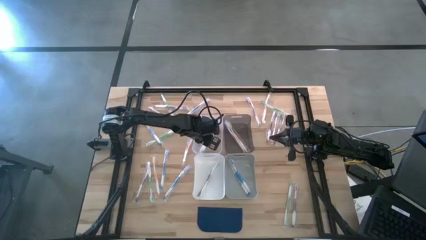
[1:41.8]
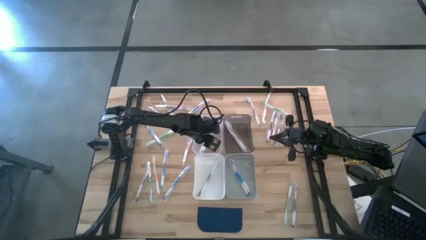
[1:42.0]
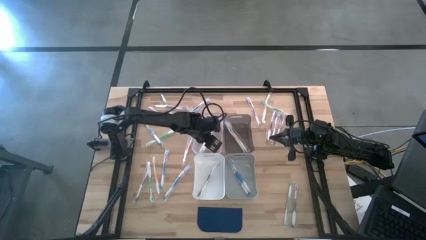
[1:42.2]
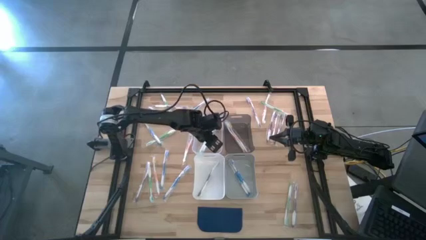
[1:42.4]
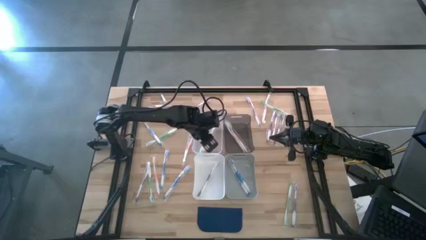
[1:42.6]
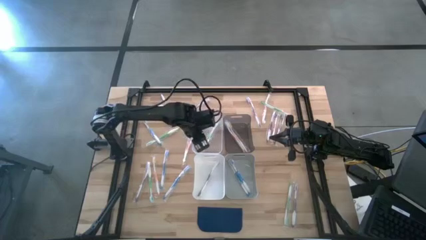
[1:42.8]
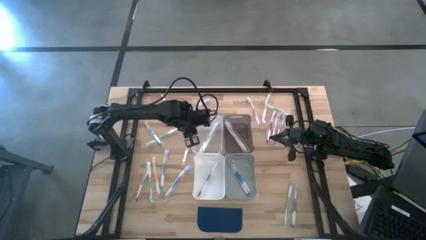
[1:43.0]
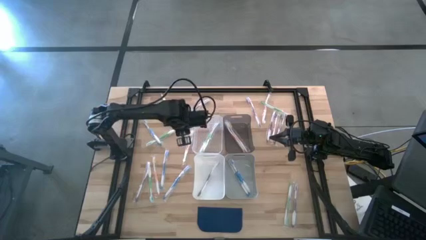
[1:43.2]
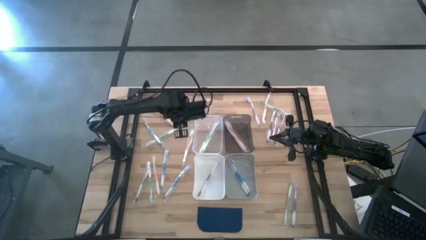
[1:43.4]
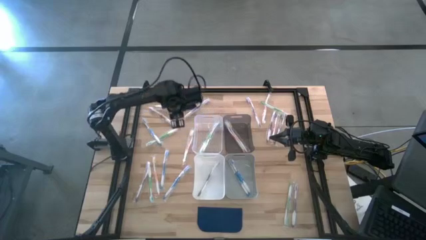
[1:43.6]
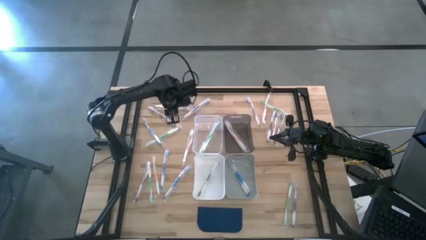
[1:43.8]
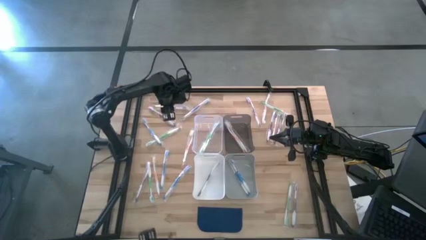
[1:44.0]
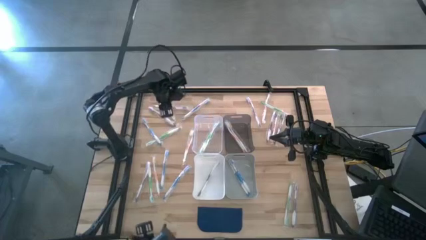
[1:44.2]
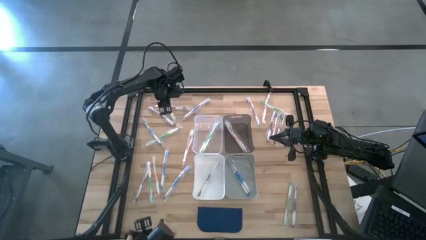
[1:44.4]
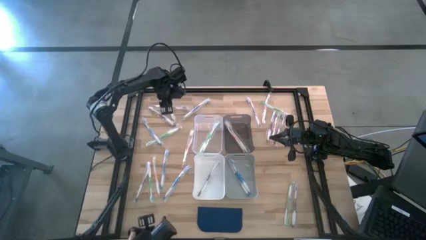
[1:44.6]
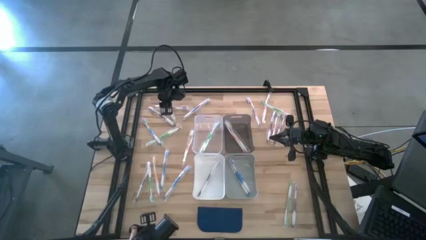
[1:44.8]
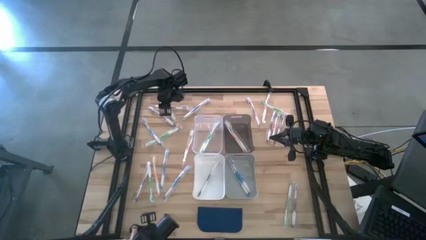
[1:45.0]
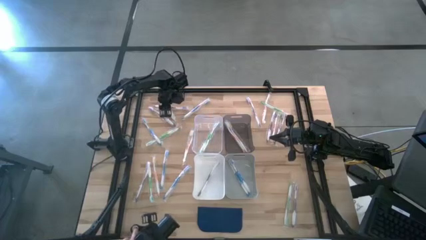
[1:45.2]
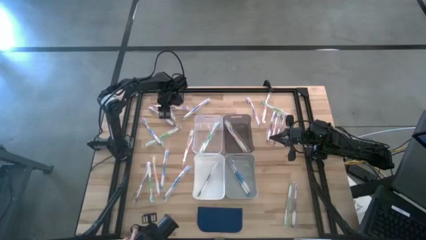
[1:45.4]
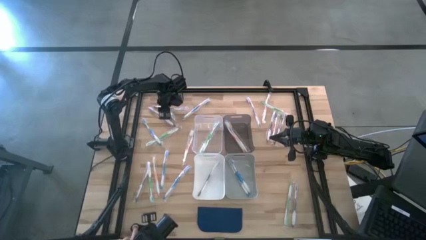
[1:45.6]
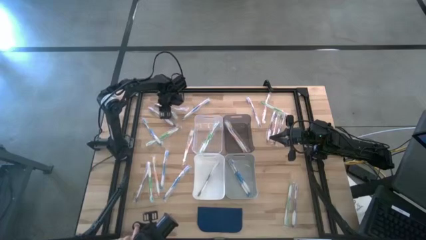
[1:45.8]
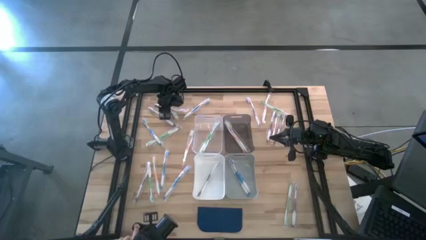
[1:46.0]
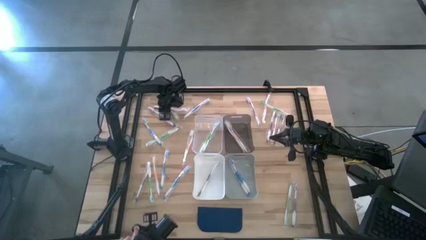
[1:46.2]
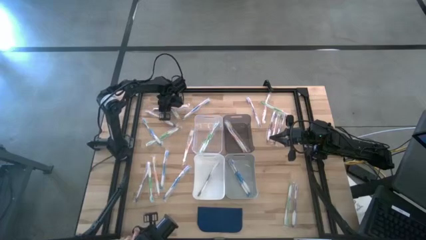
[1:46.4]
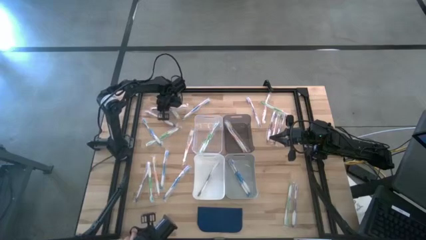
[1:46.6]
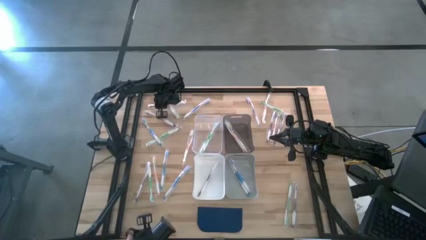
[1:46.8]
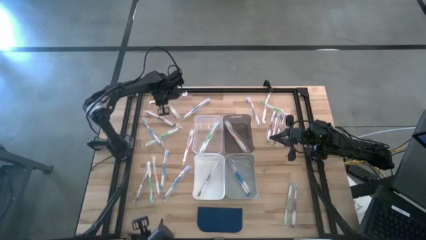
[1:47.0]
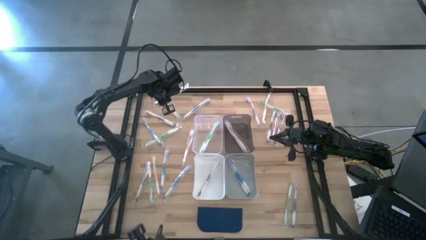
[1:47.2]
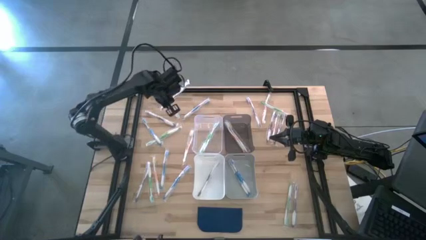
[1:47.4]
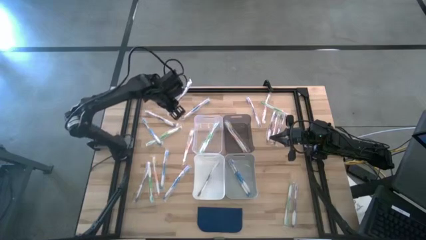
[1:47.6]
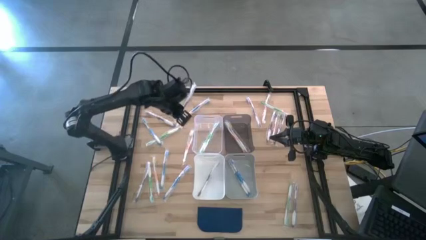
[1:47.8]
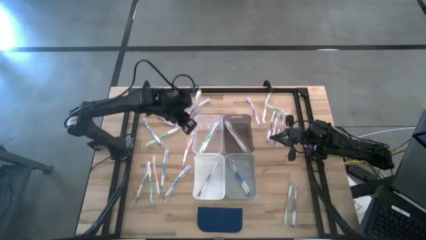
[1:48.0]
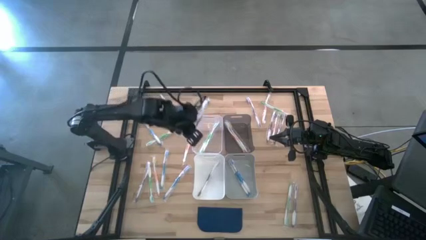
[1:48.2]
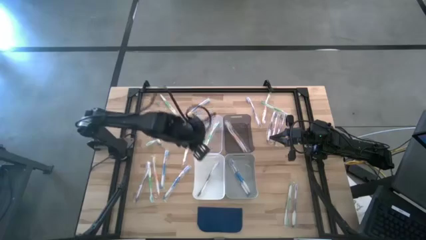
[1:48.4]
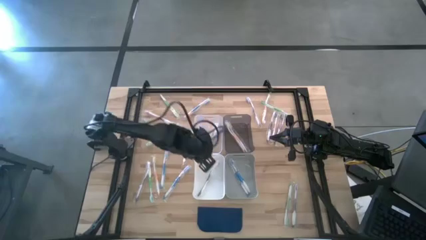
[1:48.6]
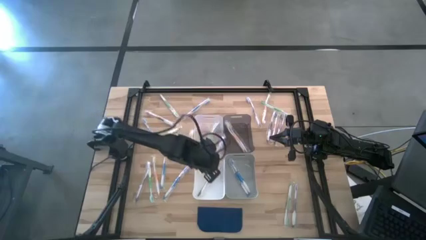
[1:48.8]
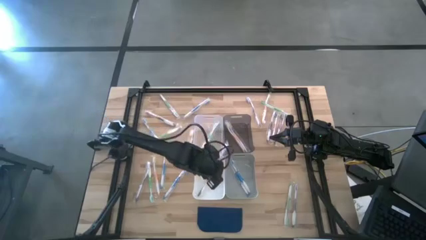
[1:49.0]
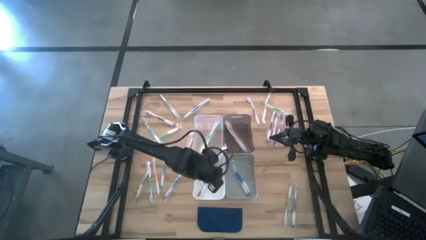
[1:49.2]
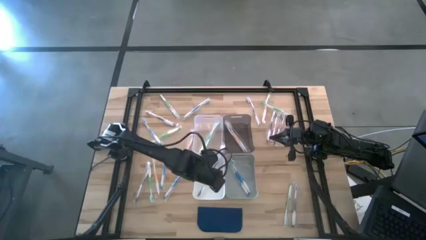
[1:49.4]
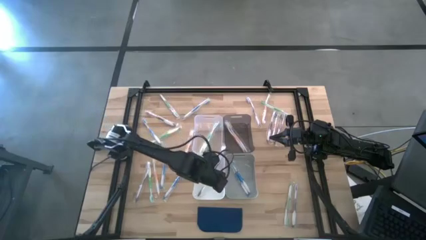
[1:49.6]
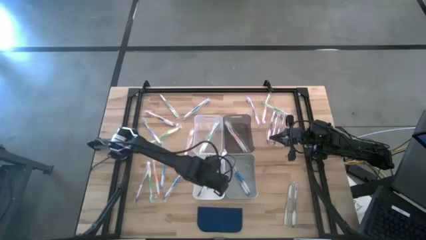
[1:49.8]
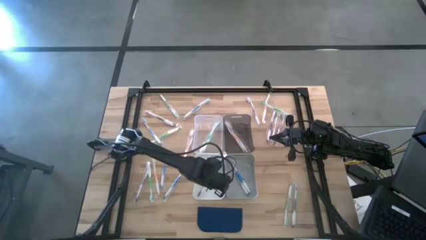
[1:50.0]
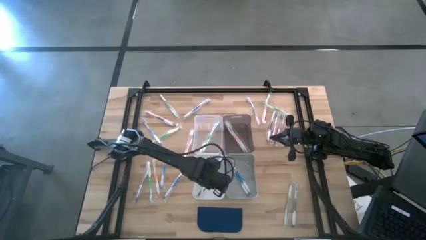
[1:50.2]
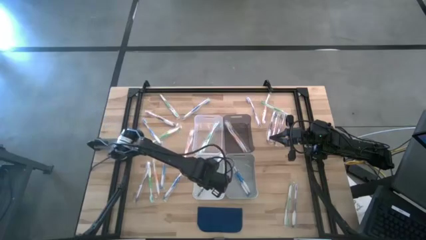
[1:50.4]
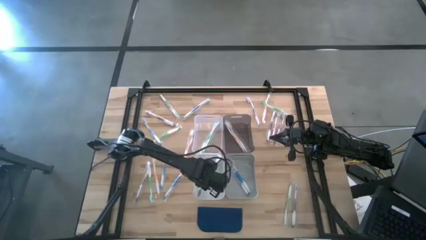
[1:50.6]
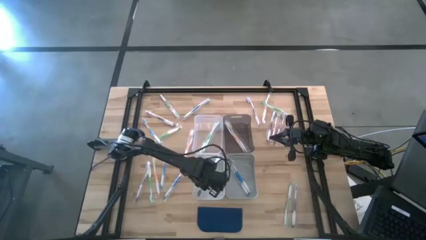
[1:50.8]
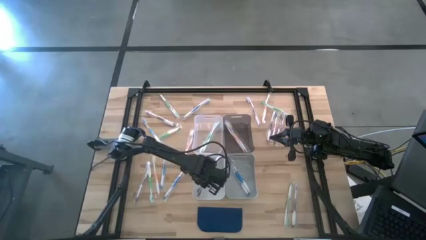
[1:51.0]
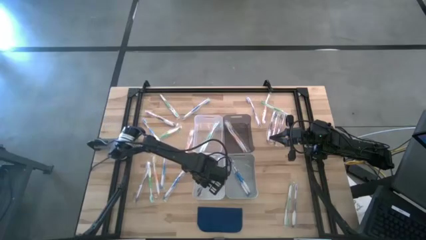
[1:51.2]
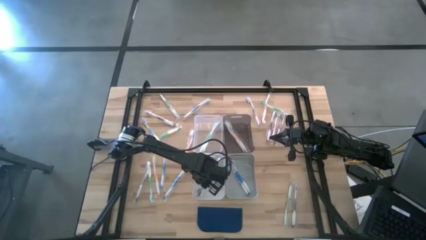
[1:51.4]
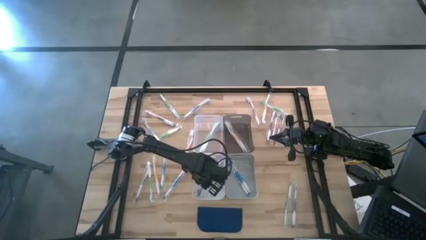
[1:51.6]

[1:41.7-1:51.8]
Task: Pick & Place Toothbrushes
Put the violet toothbrush into the white bin

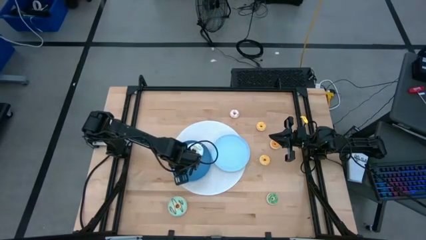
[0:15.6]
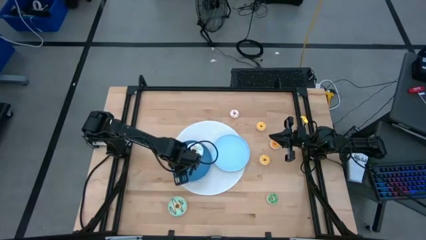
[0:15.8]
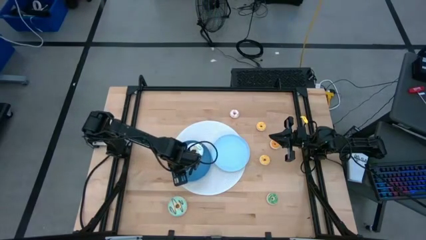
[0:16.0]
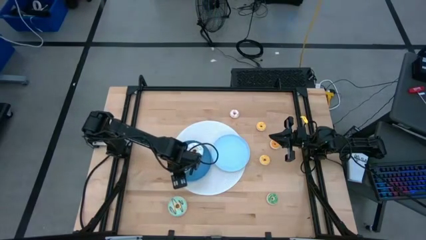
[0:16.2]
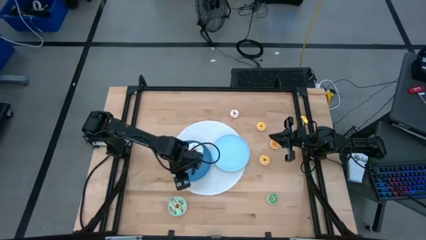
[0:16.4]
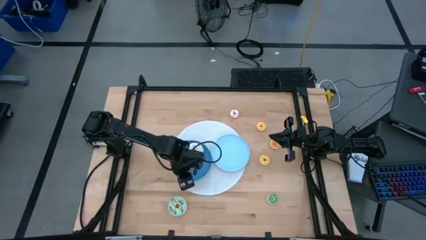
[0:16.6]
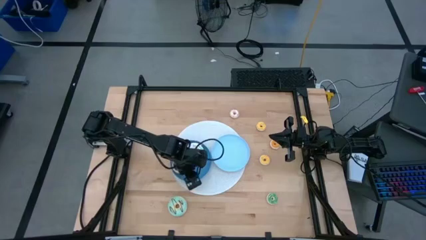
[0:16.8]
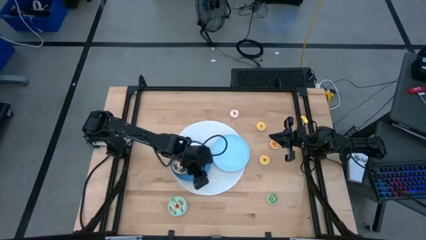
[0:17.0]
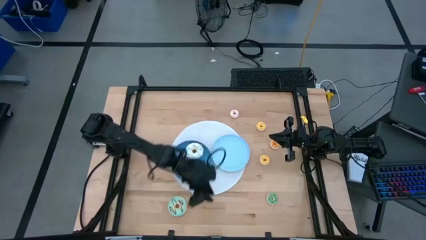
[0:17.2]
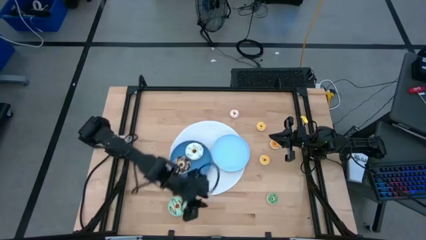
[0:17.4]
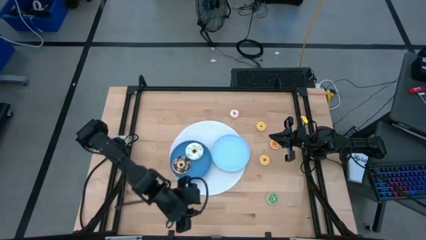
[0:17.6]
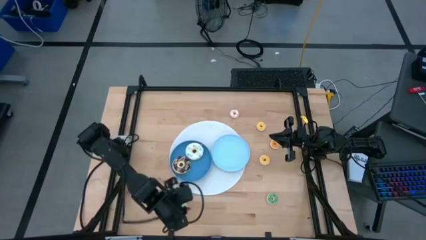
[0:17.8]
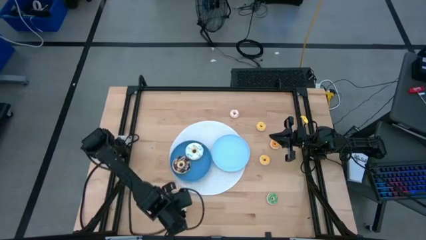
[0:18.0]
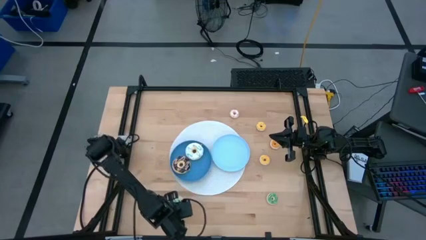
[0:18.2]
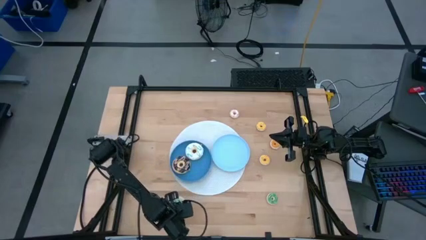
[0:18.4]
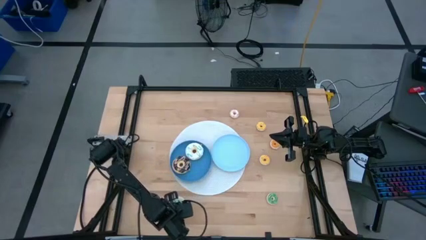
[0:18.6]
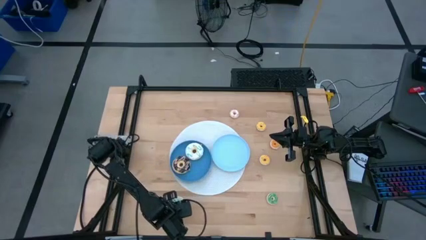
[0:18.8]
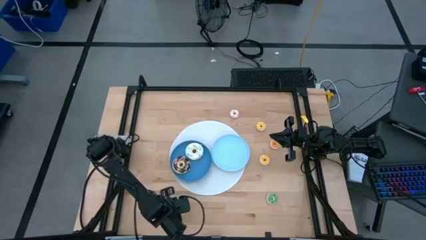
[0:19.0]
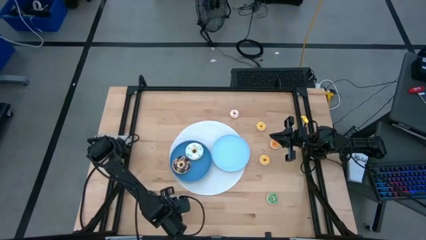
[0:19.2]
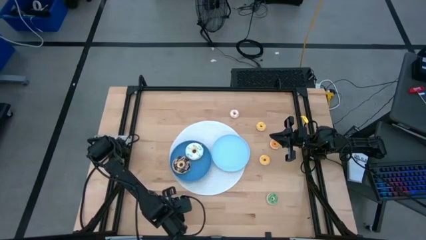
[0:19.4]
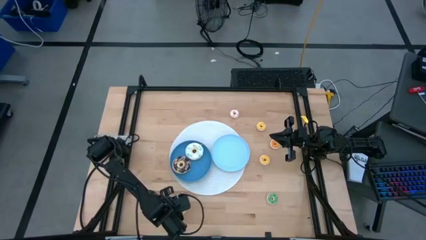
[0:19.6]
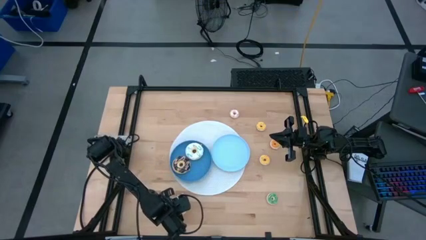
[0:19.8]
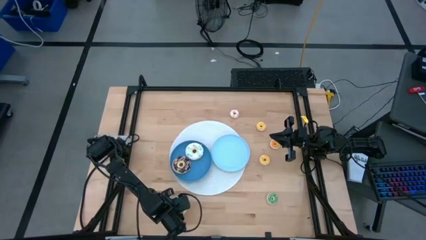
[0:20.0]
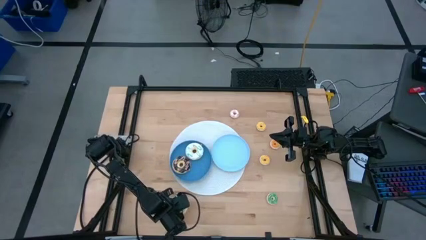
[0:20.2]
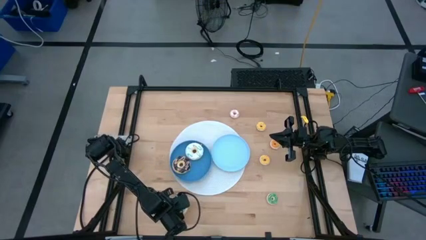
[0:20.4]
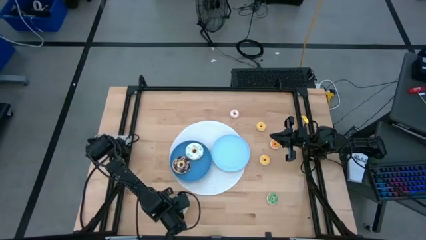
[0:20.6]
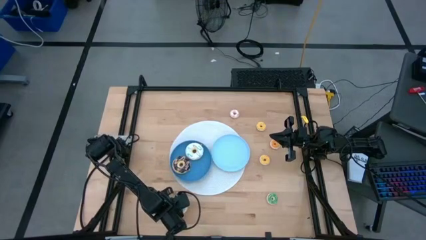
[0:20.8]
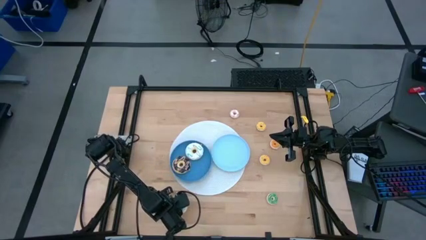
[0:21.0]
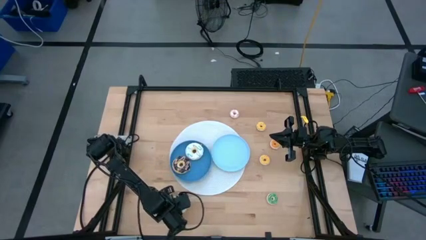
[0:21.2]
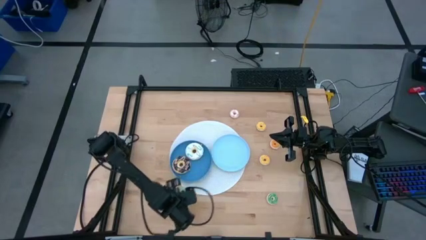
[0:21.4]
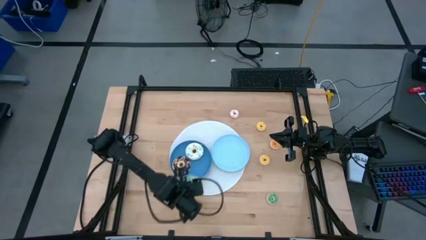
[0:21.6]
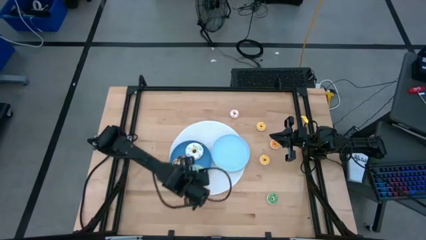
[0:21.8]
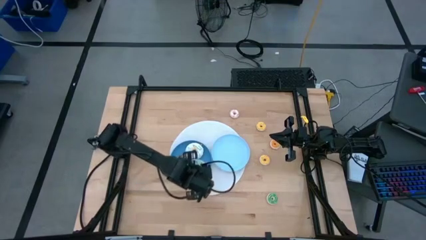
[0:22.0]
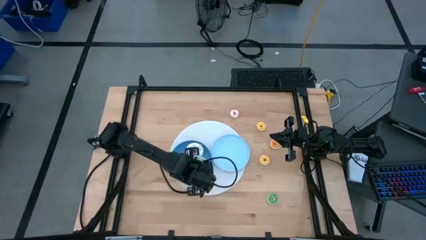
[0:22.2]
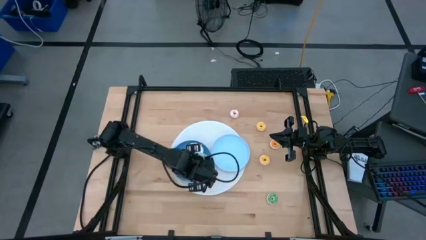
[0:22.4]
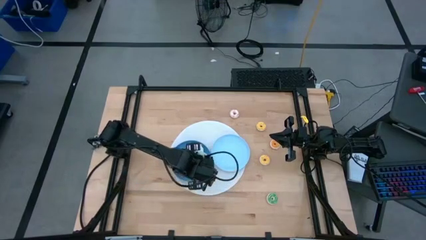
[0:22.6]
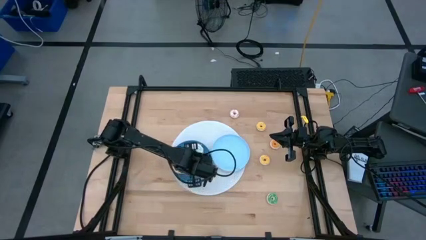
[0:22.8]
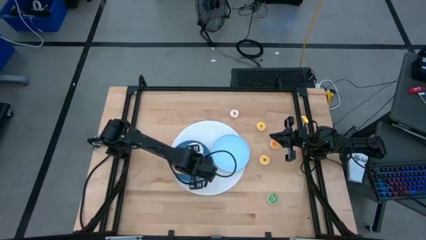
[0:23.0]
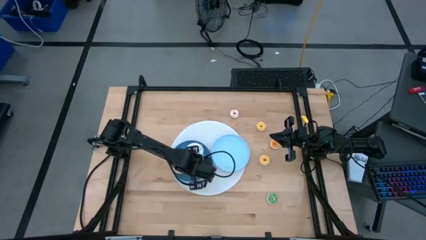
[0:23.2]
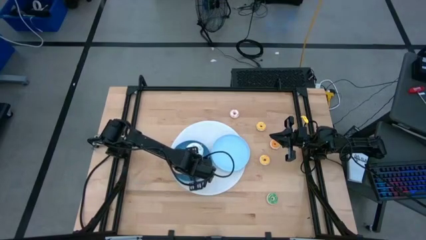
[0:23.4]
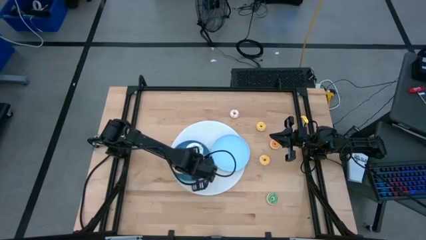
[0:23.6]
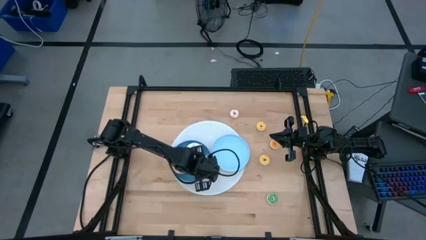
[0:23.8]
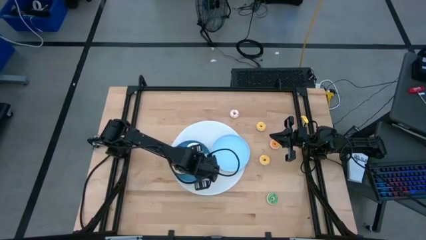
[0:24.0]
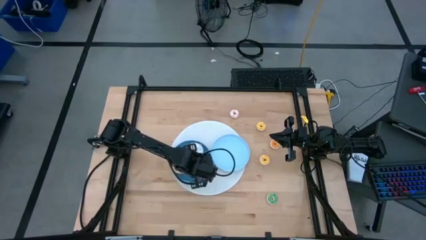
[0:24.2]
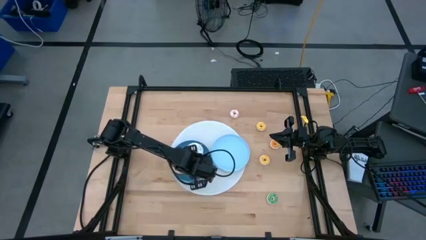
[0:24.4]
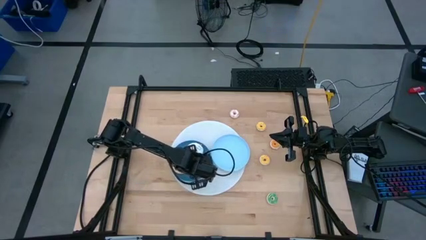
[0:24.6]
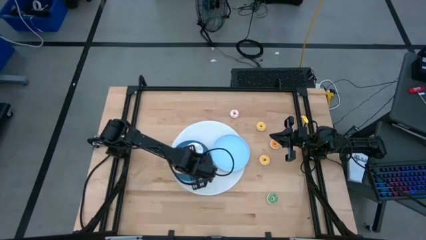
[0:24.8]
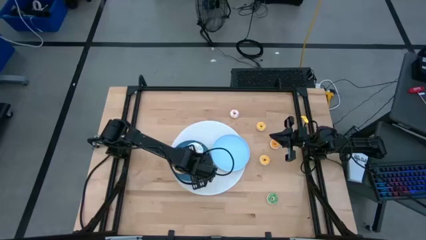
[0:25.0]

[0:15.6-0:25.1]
Task: Pick & Place donuts
Put the large blue donut on the blue plate
